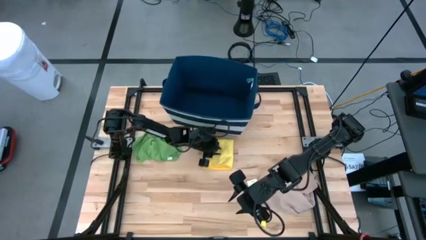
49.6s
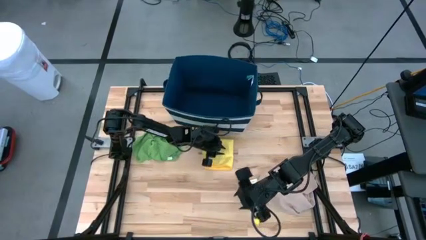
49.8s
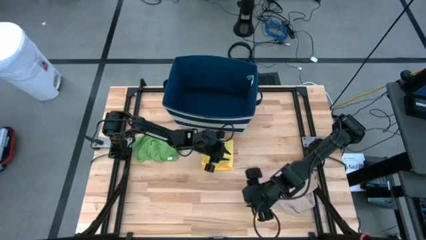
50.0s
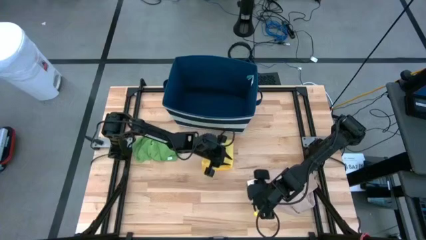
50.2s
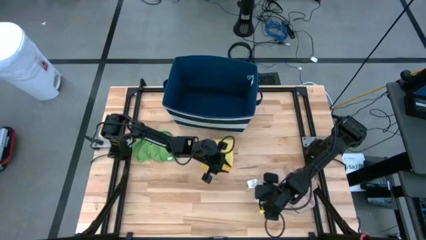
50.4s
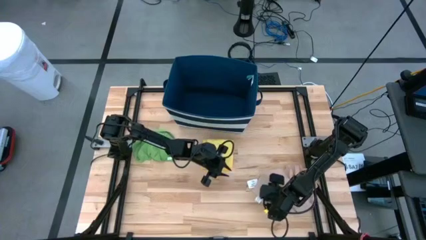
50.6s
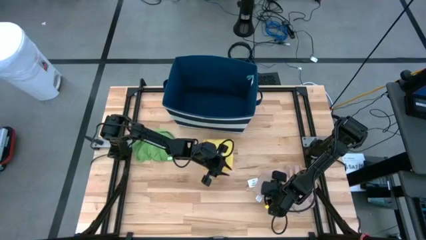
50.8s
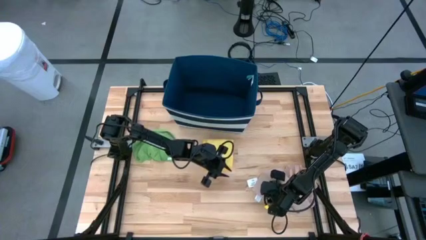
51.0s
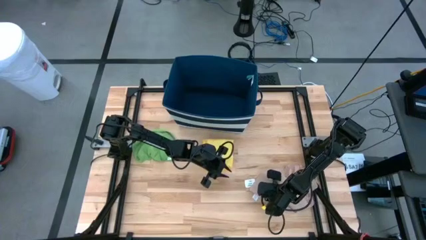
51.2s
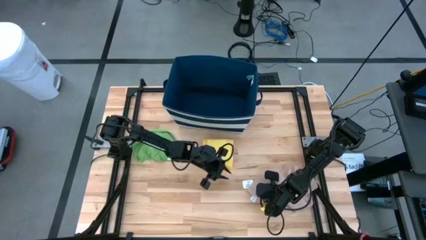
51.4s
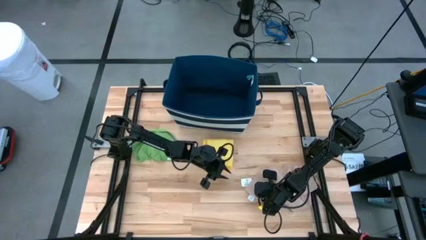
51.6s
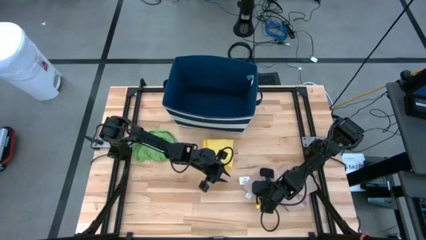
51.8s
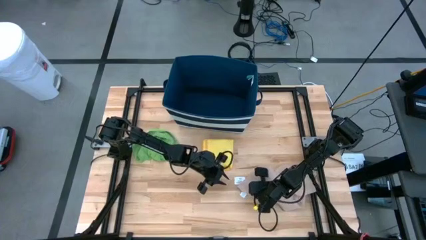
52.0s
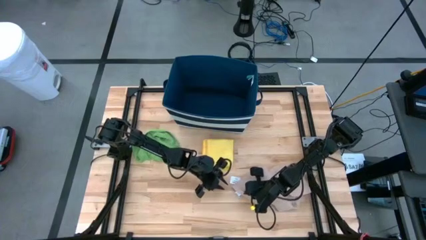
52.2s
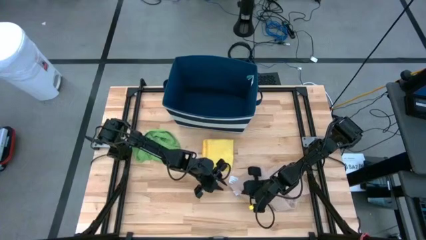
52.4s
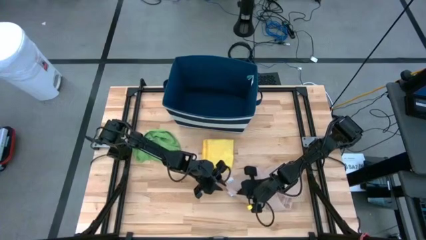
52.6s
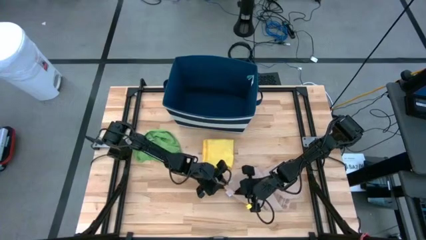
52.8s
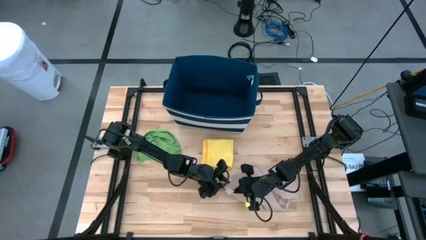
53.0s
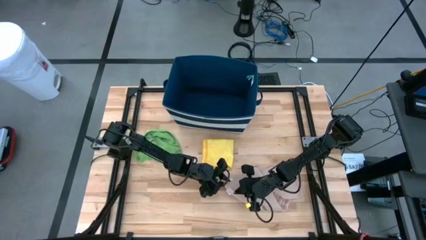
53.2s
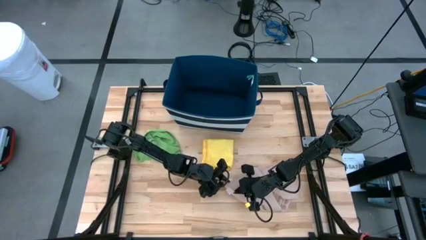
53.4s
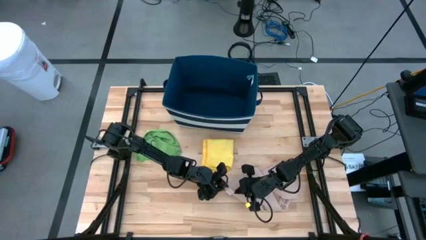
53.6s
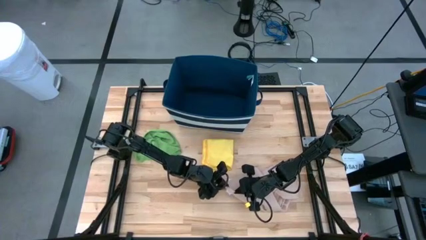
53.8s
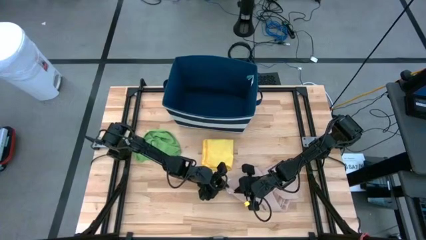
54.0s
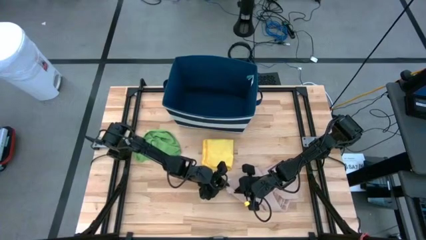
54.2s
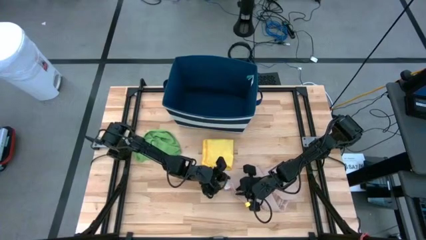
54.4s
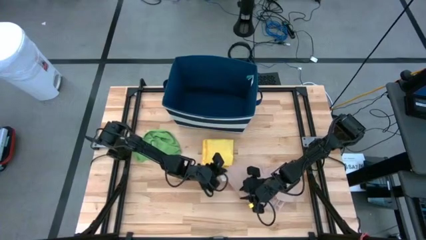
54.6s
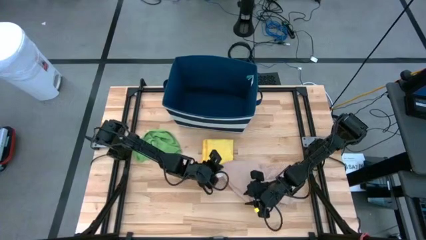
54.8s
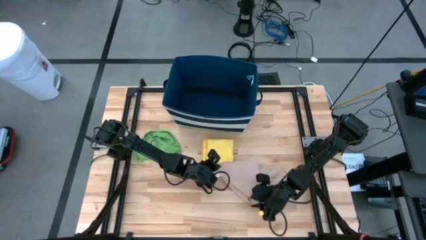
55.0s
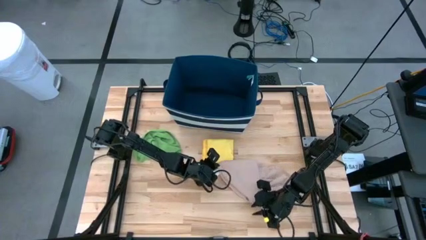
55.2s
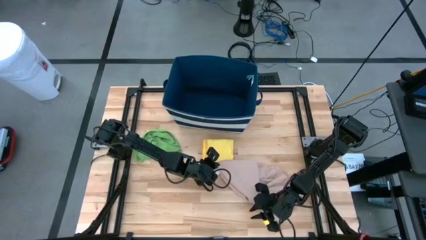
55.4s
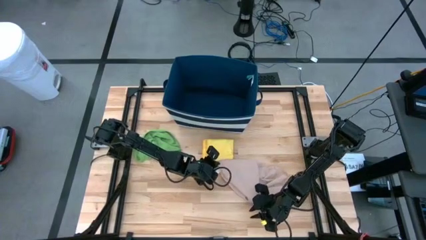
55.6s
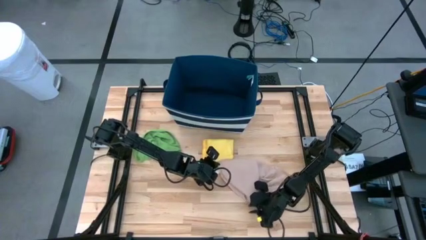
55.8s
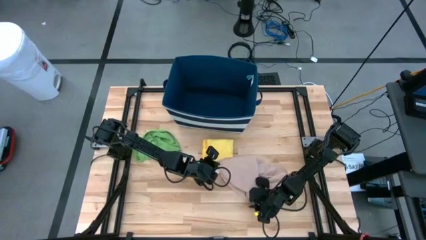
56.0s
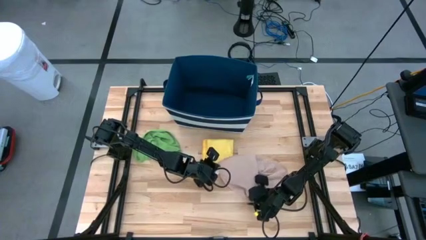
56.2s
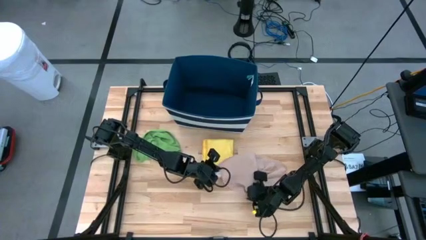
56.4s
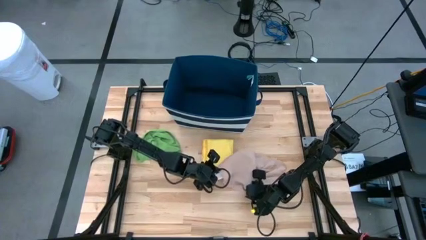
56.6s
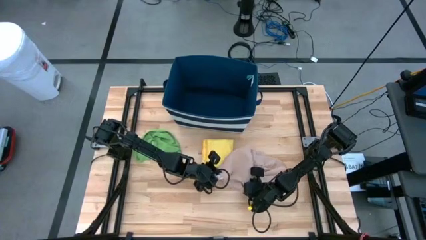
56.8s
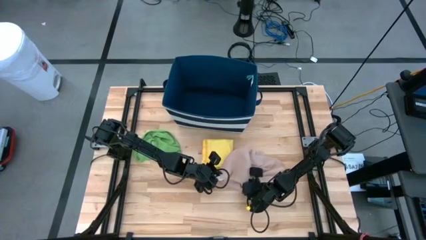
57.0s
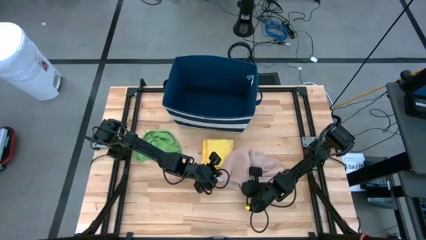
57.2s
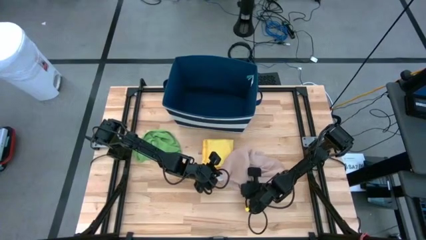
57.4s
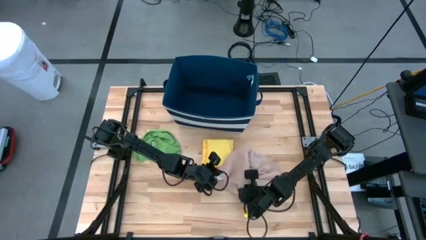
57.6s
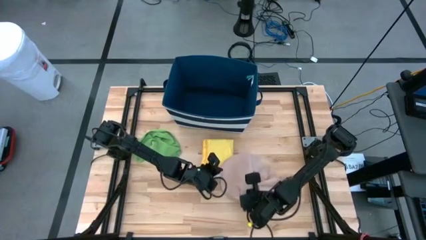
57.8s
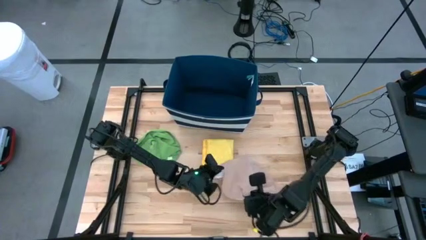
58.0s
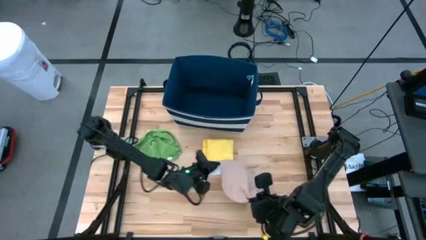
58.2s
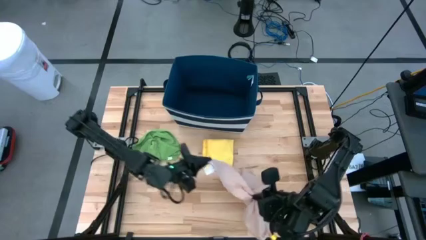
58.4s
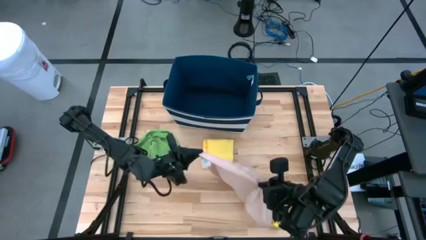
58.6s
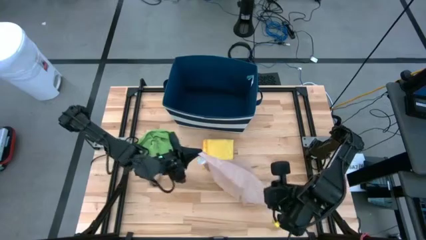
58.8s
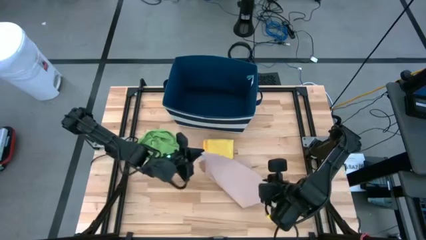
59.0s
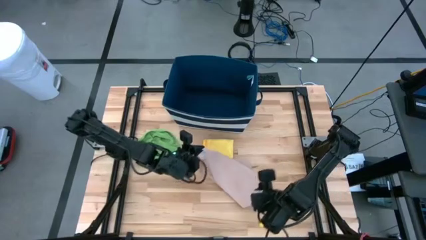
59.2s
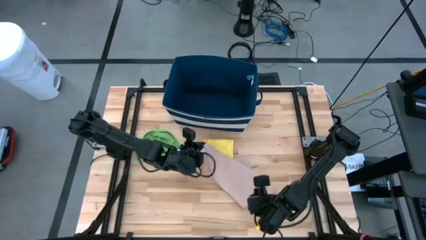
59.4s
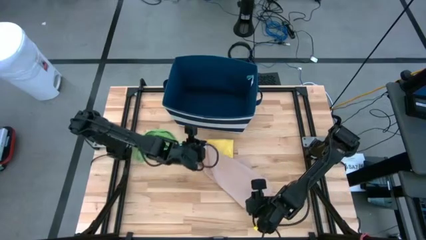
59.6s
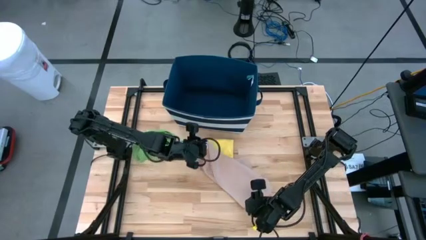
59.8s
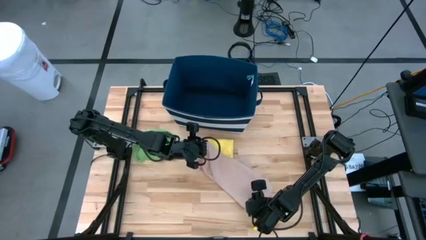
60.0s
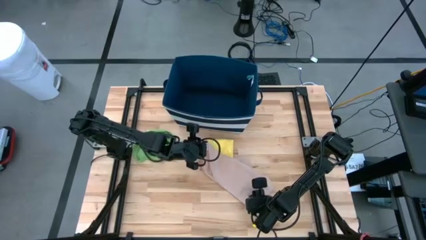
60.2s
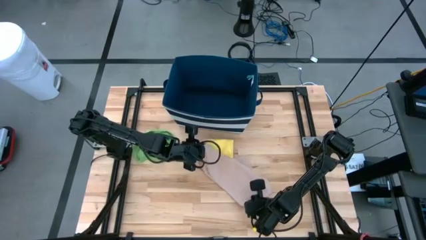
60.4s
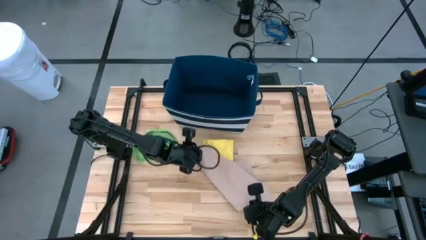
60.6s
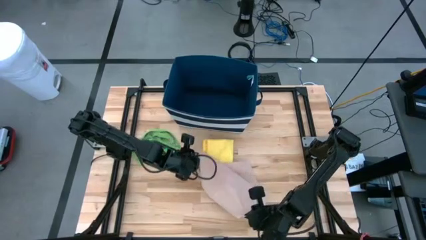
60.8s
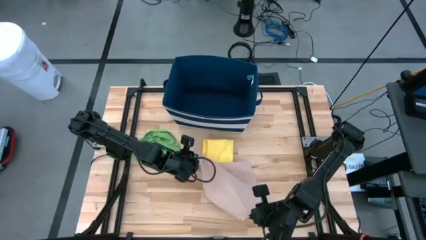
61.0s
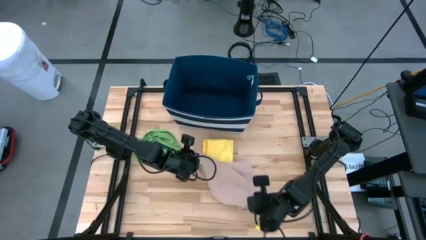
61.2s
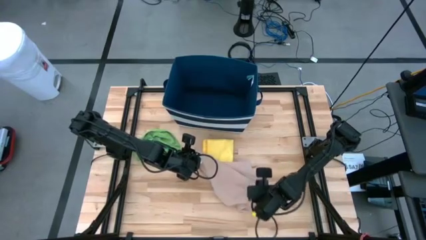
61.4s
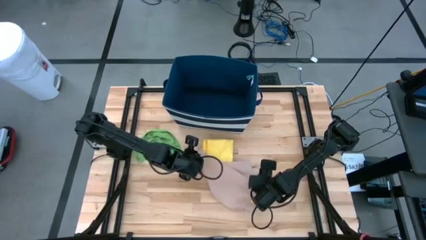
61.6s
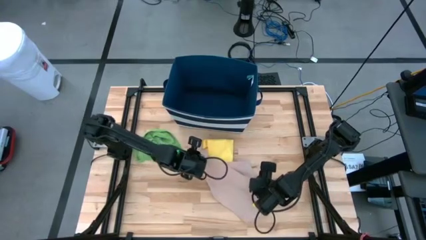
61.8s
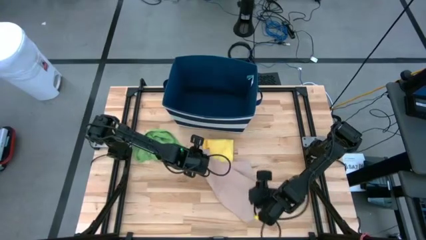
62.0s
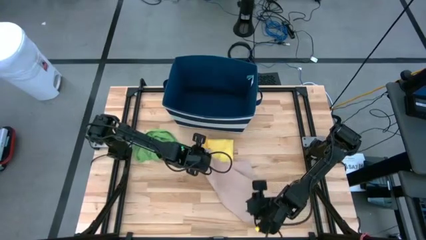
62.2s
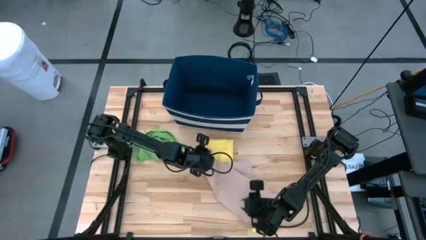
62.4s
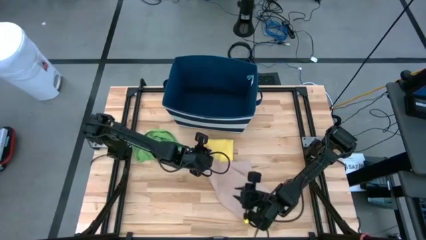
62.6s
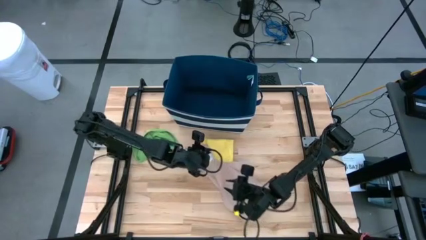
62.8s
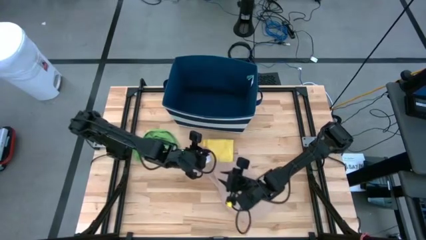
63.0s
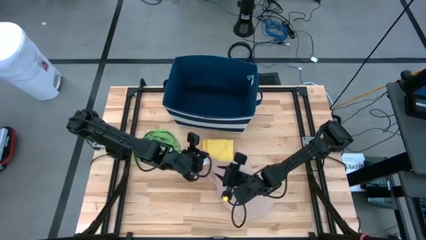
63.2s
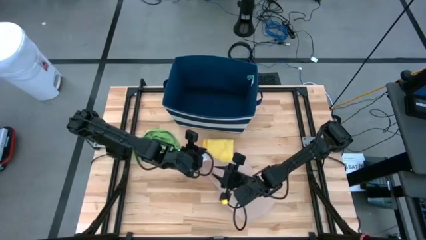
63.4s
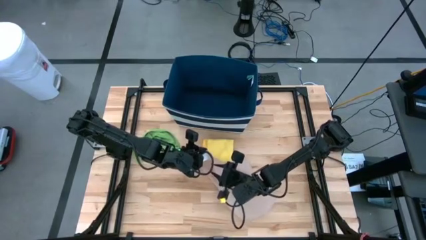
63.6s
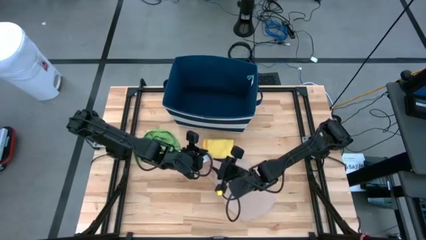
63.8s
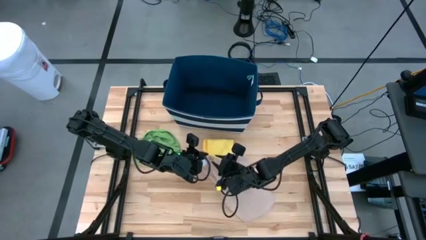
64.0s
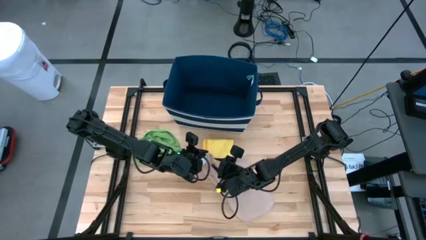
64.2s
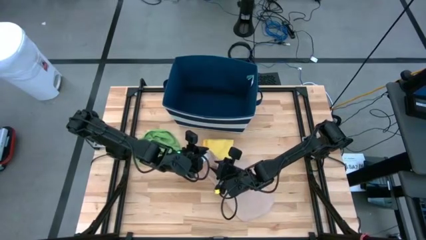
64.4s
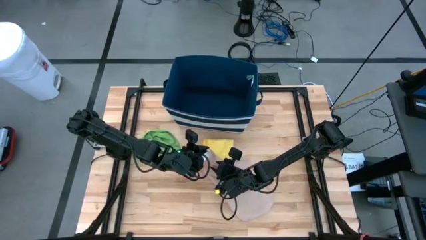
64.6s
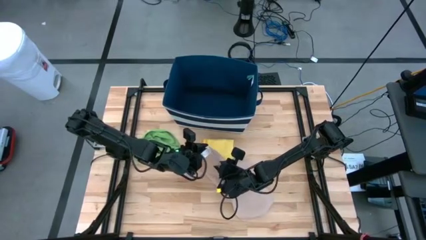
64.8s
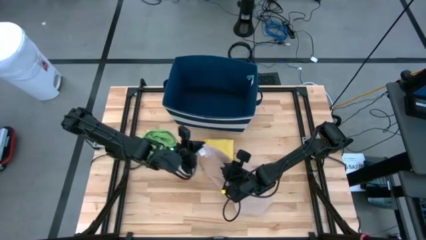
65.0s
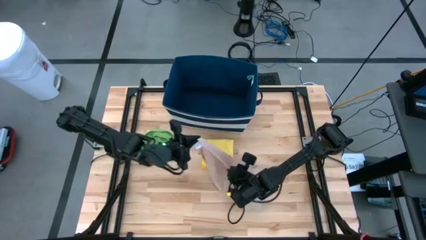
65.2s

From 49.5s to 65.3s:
Task: Fold towel
Fold the brown towel
